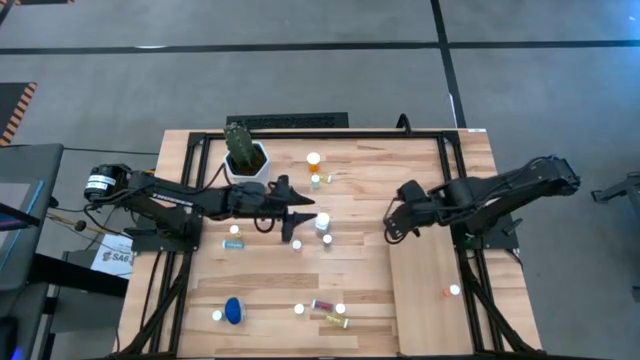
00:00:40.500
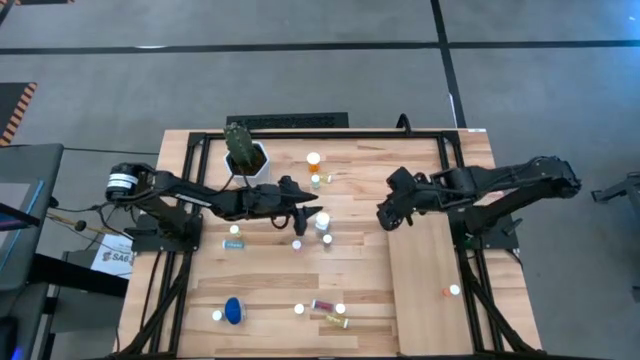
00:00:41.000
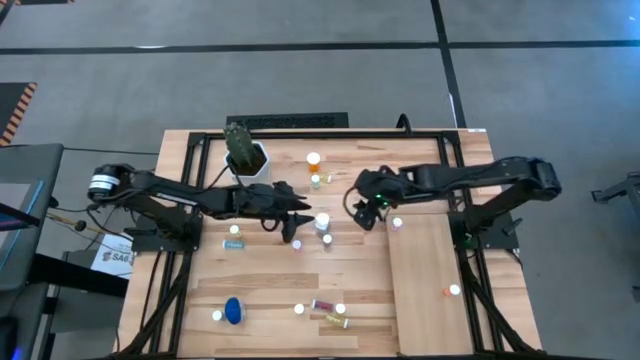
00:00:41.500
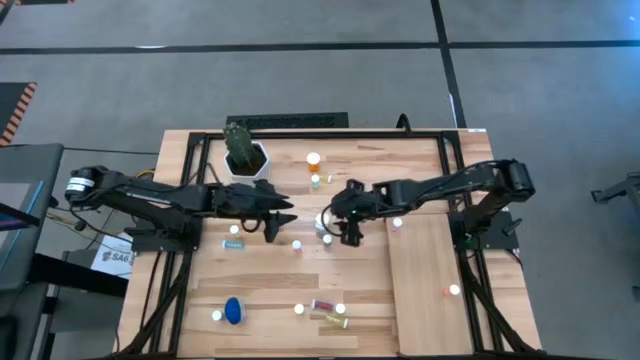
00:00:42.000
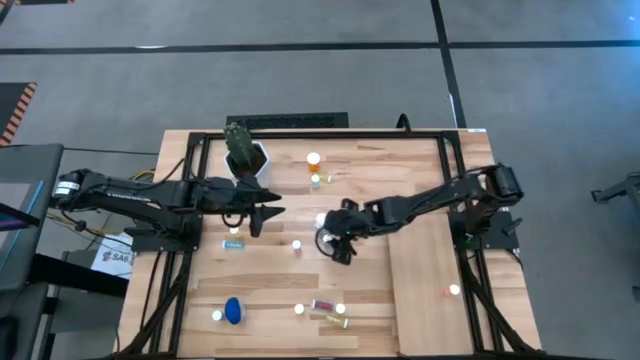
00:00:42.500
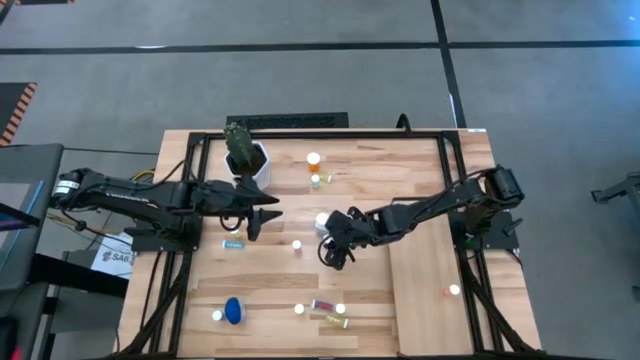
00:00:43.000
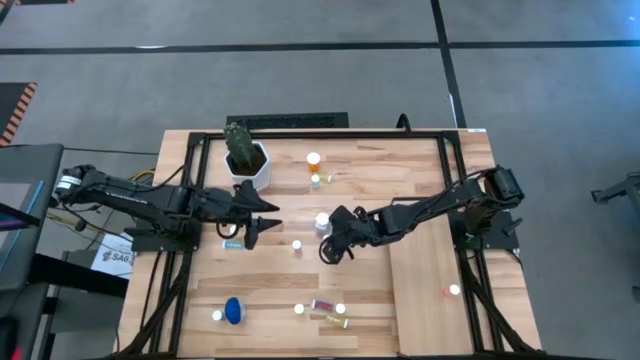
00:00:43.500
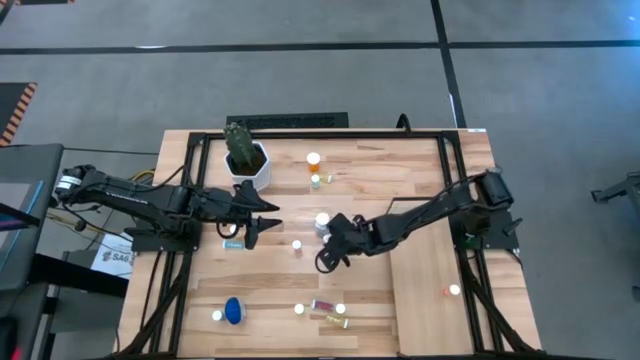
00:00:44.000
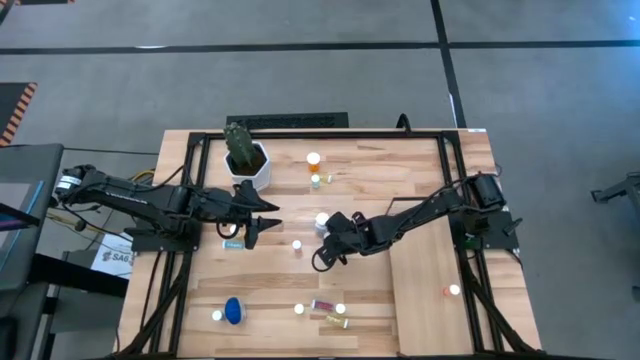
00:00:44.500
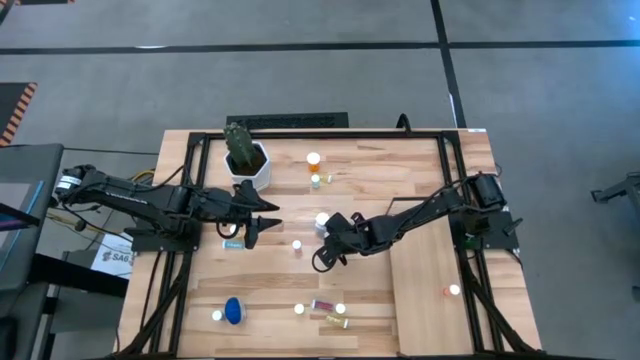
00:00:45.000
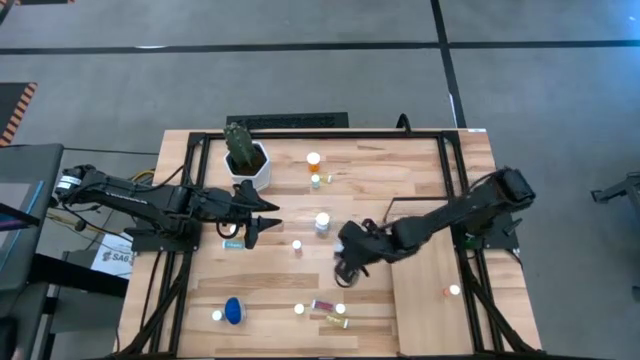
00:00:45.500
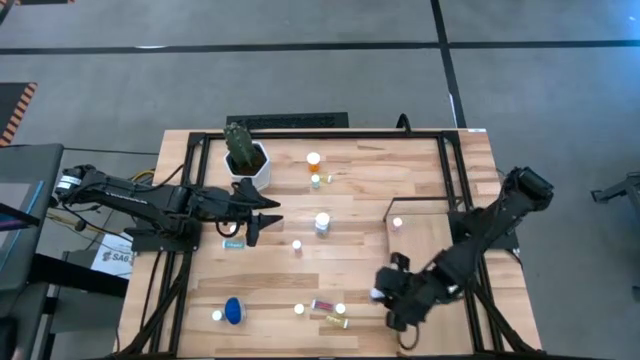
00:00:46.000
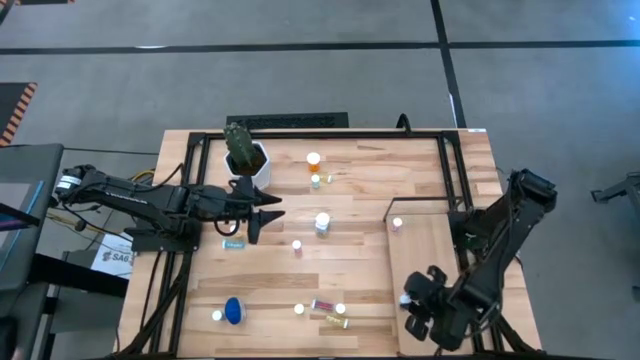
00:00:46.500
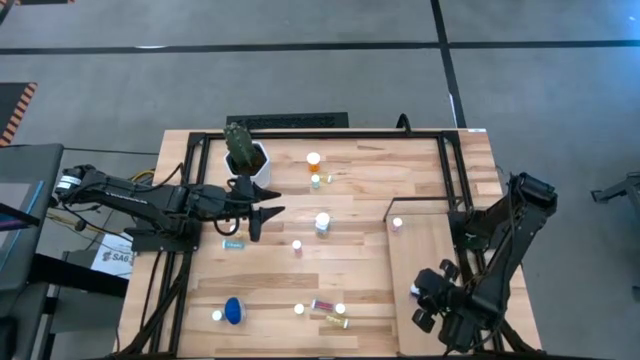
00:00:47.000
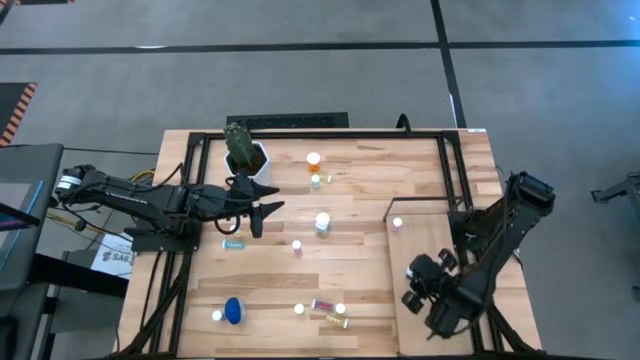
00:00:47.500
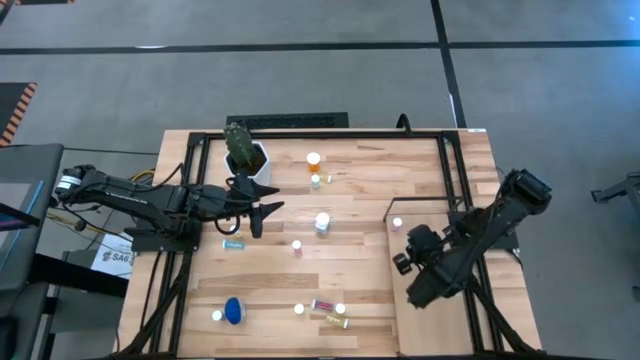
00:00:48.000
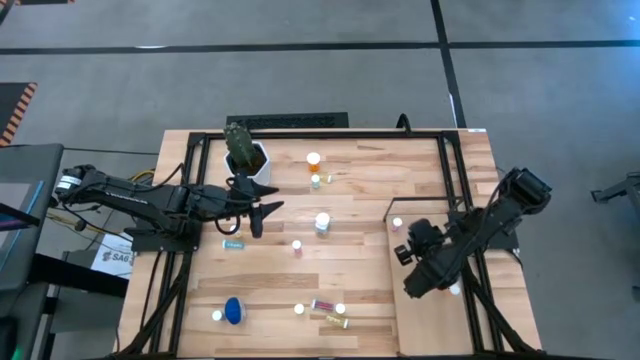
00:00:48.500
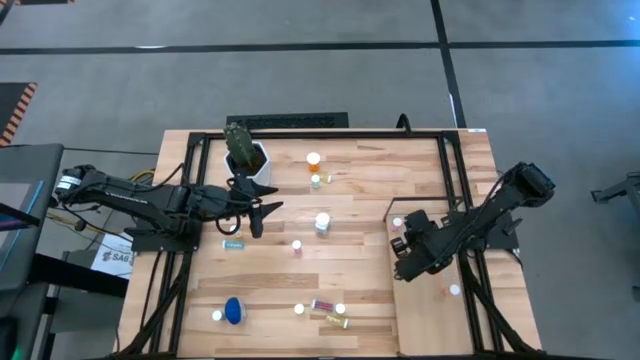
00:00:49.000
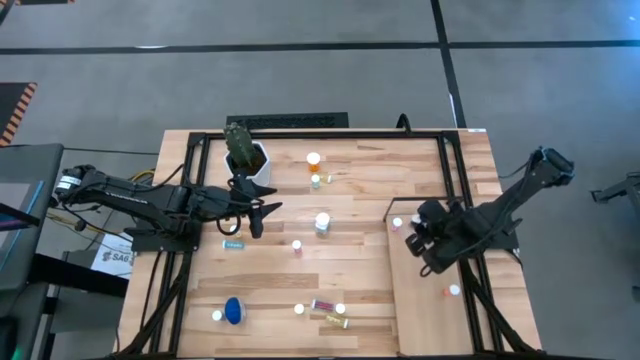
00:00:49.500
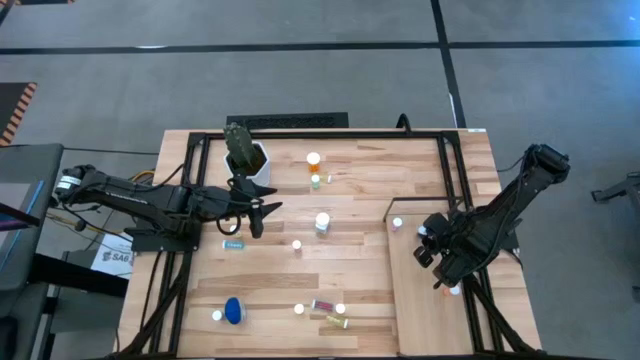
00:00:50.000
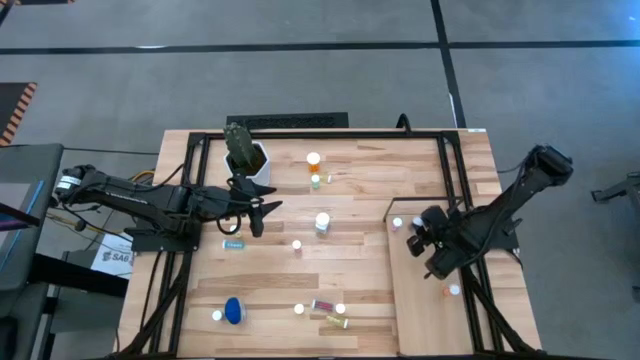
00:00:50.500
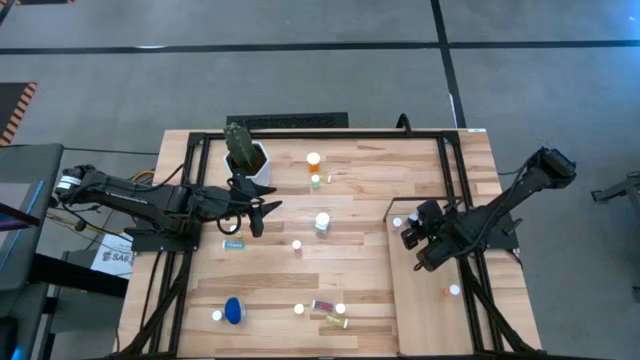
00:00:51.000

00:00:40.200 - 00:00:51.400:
Task: Pick and place medicine bottles onto shelf by color
Put the blue pill bottle on the shelf

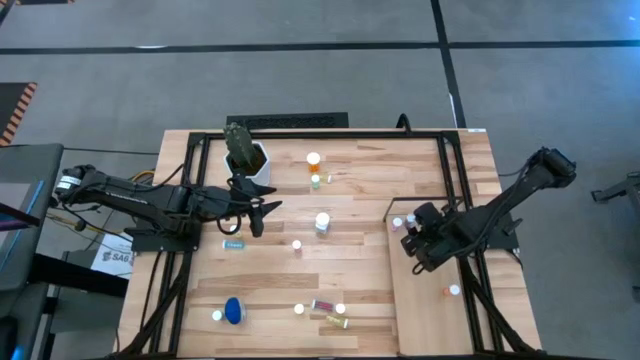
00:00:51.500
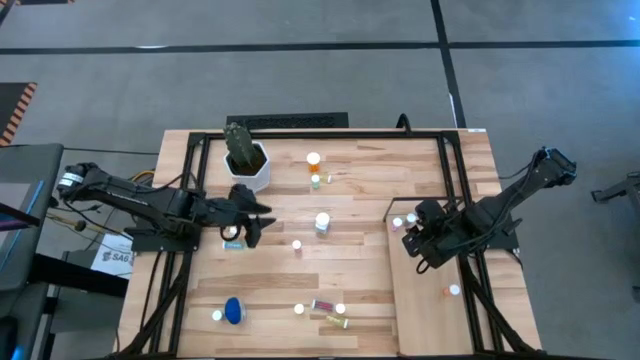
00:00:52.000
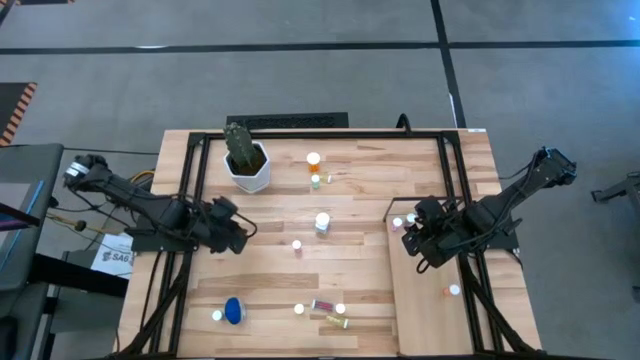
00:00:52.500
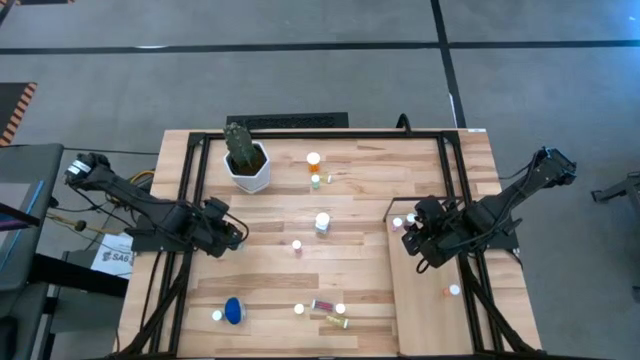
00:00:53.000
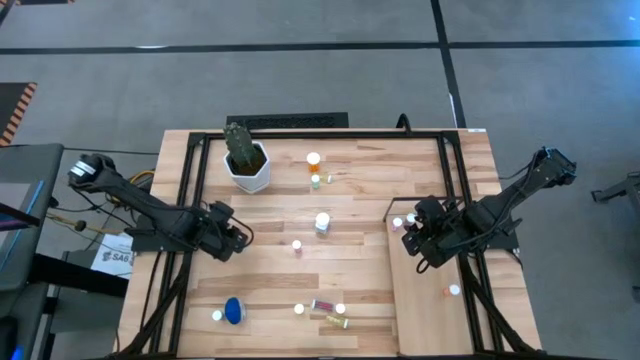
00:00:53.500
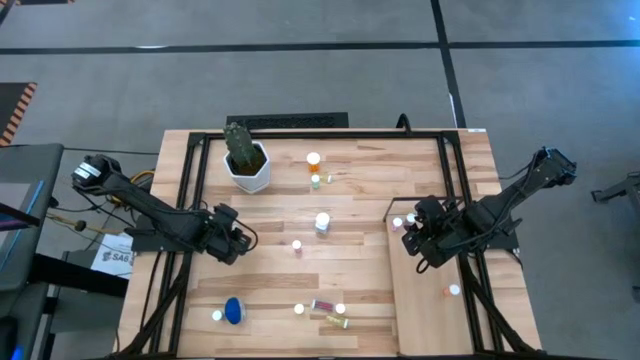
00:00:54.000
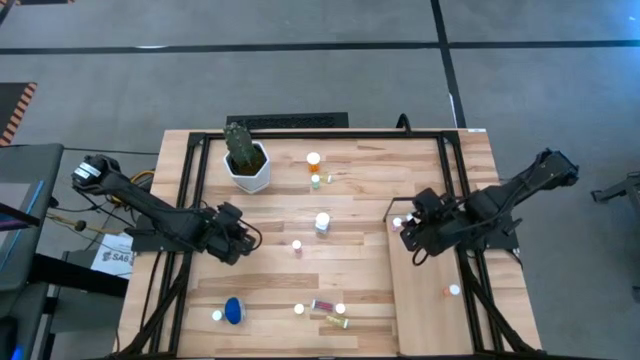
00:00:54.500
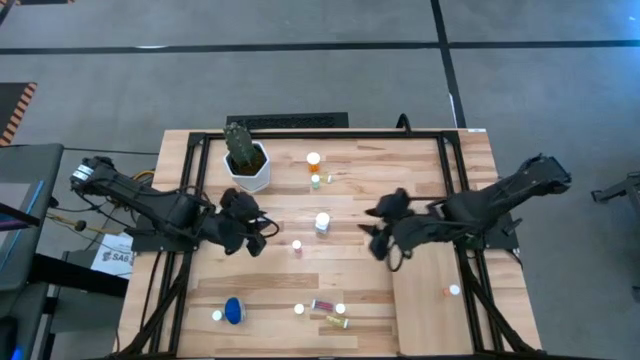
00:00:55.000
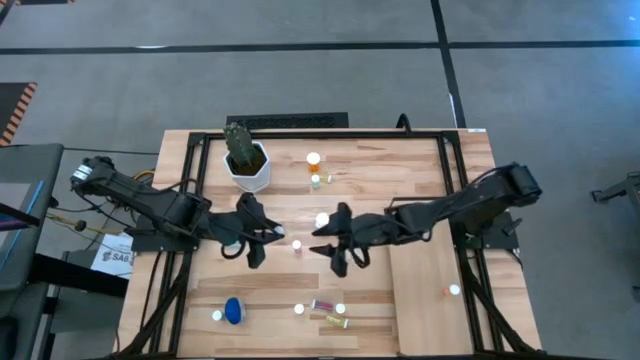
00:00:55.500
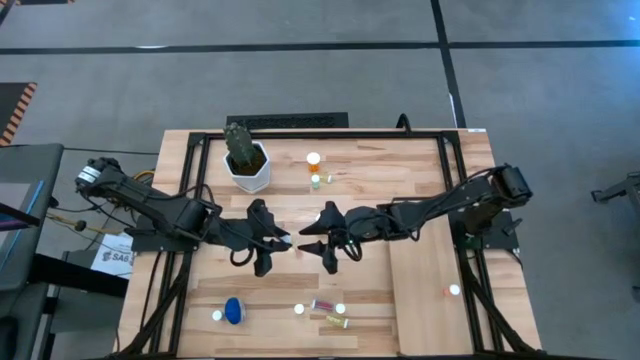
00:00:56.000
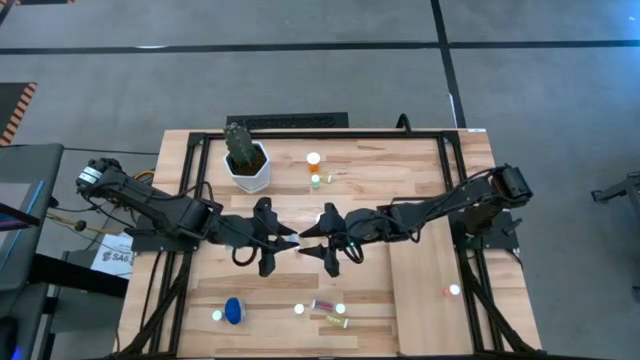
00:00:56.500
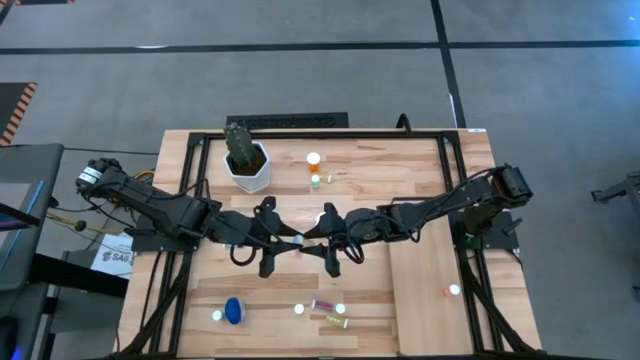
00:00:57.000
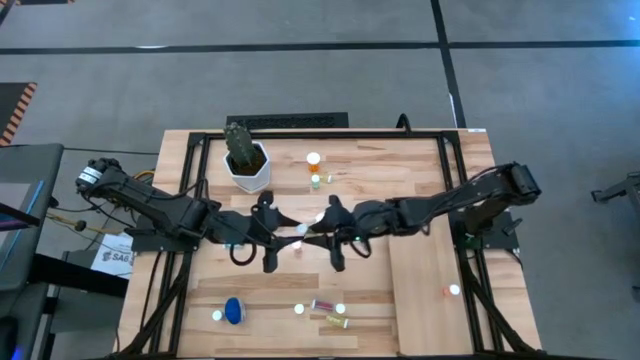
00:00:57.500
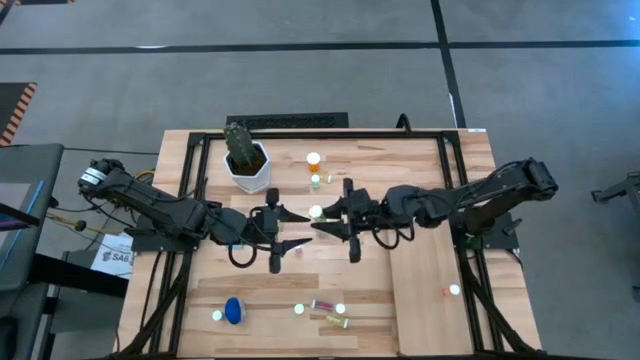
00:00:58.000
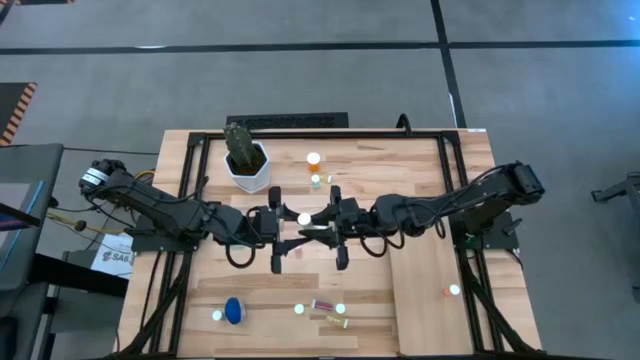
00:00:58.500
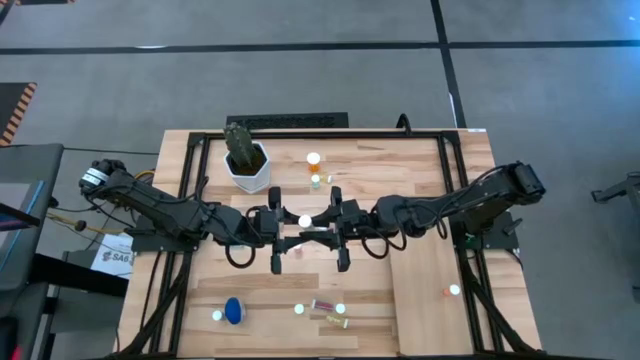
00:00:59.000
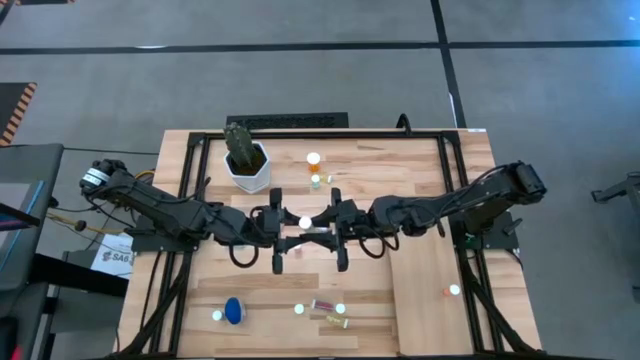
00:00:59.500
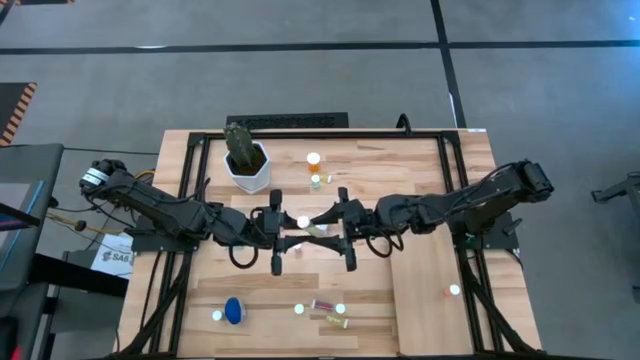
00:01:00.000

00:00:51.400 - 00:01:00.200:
Put the yellow pill bottle on the shelf
